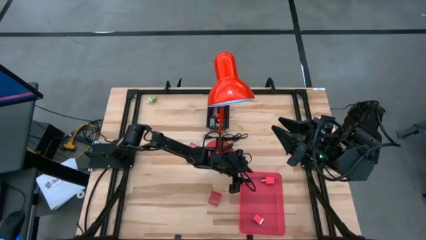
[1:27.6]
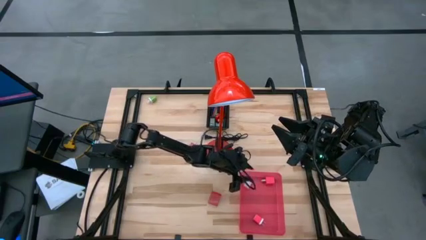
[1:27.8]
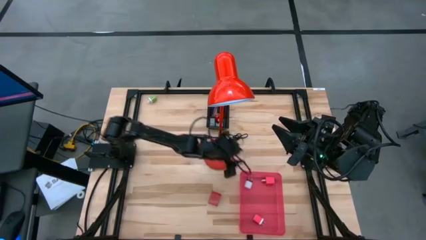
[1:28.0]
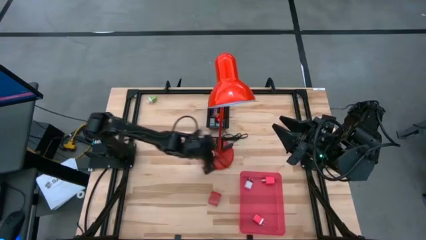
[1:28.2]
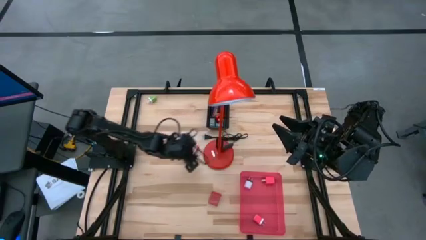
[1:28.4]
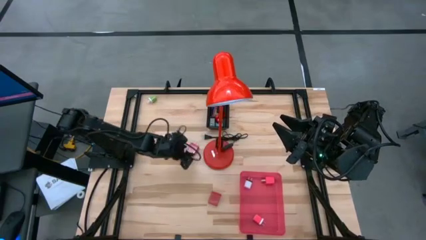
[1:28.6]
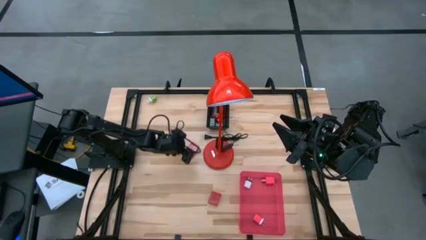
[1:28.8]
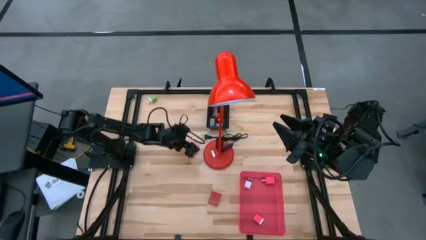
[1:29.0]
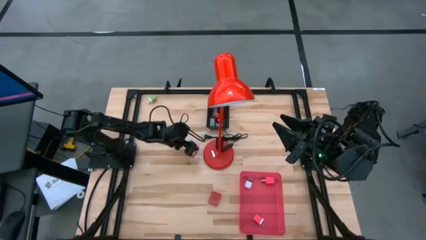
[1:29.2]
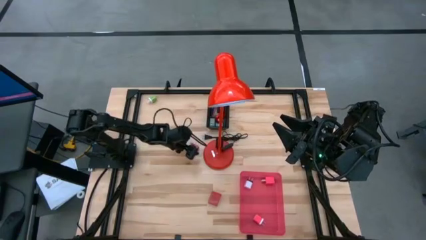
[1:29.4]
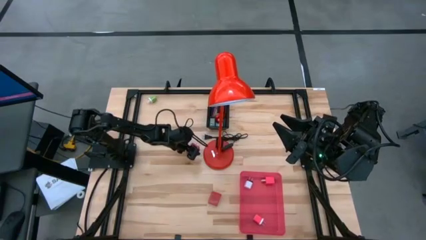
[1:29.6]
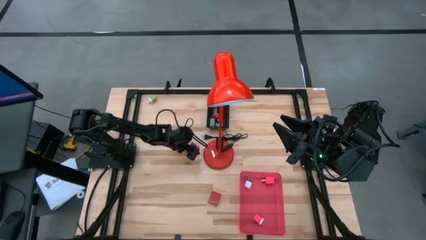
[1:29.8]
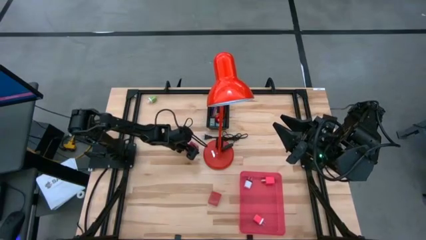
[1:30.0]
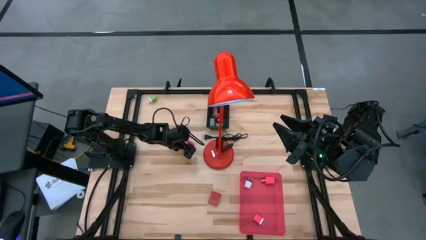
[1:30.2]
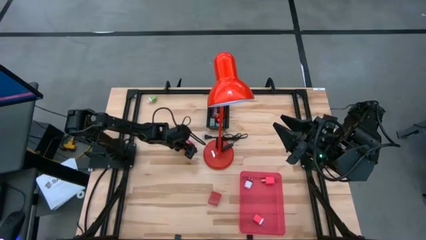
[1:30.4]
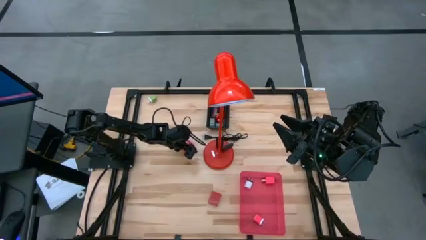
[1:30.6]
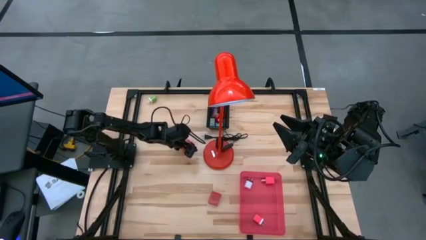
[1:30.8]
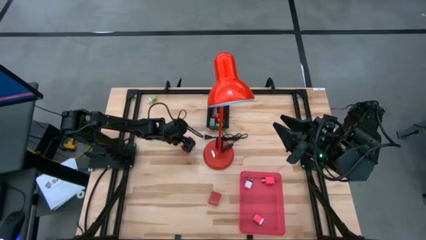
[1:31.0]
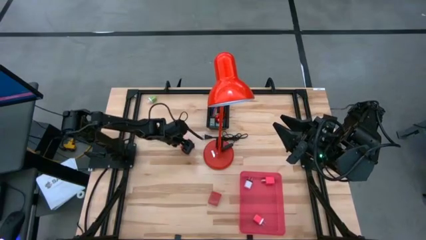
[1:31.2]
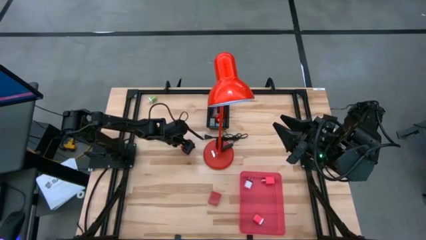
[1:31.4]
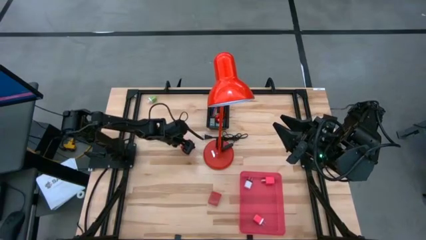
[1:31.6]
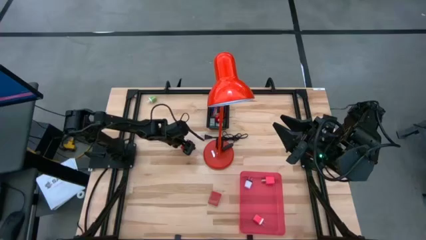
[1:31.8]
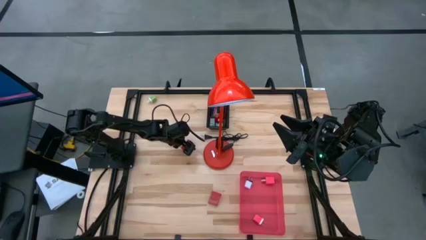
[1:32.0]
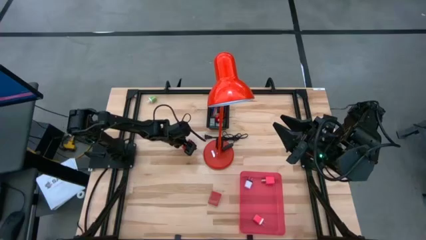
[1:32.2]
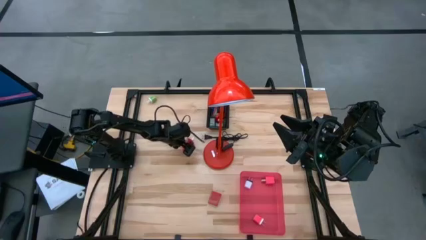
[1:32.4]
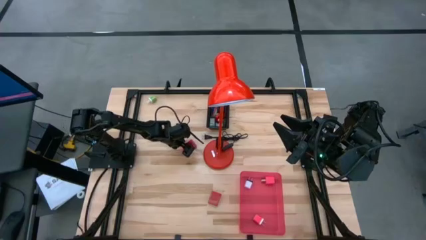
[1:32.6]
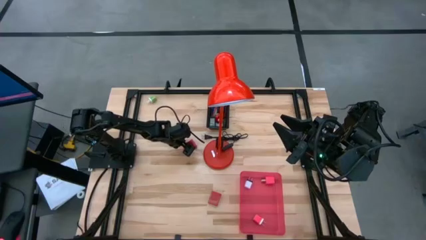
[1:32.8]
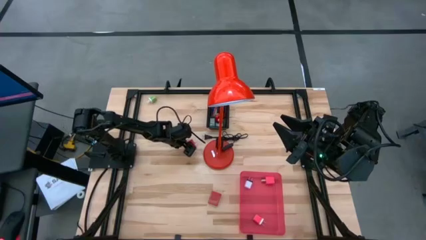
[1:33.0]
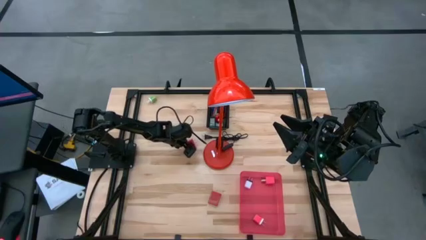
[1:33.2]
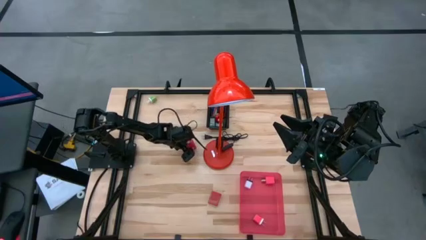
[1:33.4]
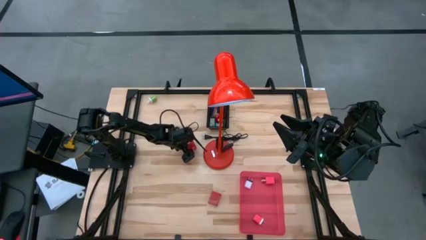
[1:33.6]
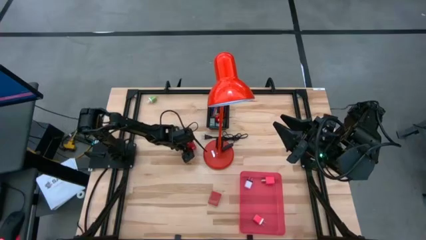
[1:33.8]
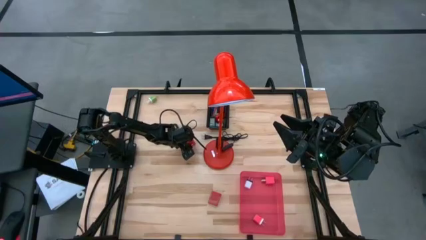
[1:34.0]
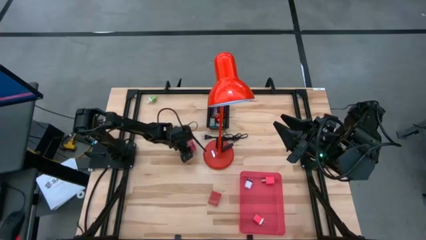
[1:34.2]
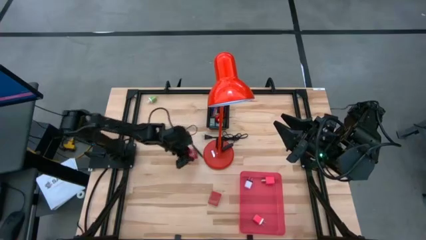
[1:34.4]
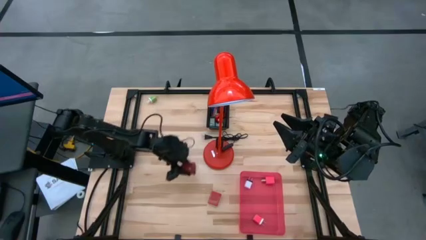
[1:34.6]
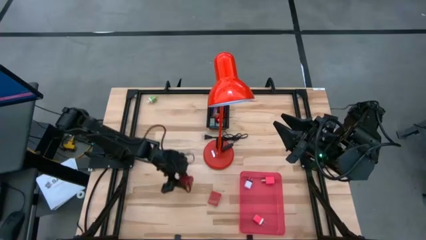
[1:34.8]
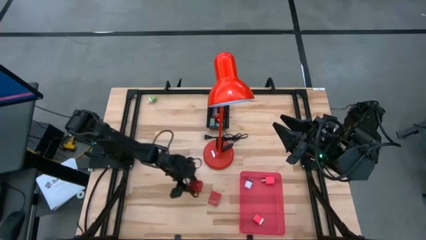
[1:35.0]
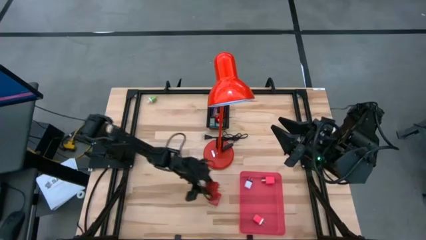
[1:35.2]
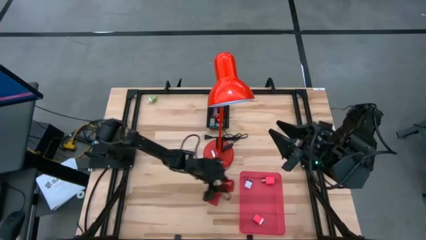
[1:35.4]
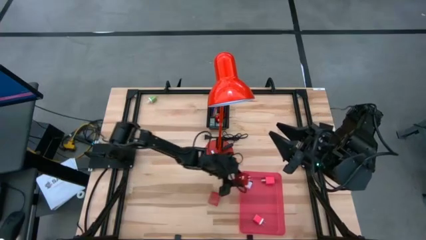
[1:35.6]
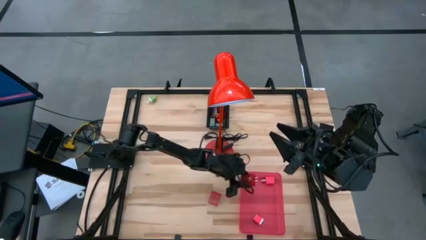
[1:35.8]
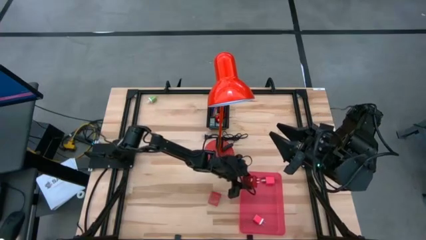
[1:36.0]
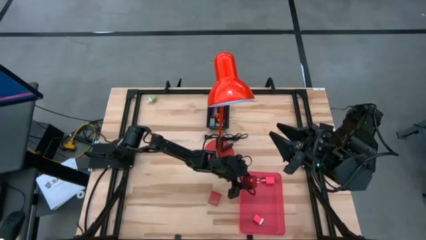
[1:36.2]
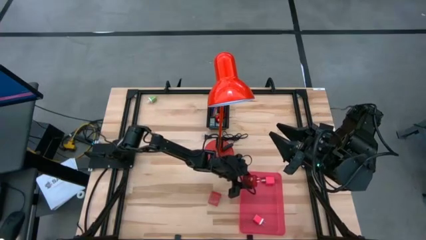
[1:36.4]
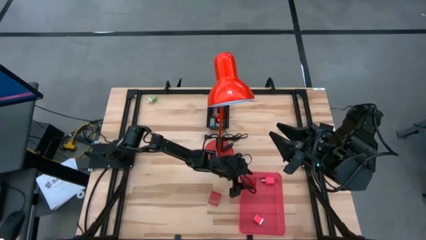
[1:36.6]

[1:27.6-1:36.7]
Task: Pick & Place Office items
Put the top red charger adapter into the red bin

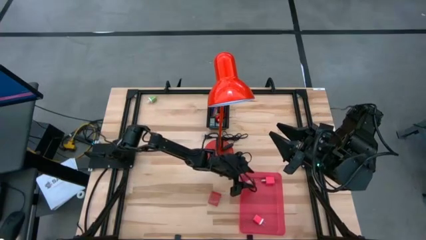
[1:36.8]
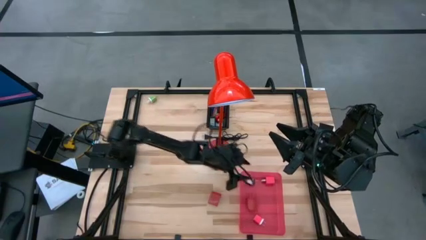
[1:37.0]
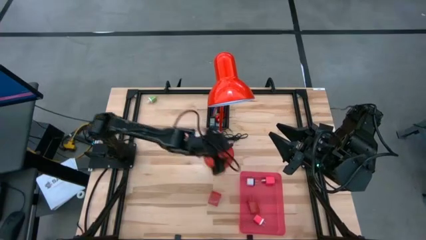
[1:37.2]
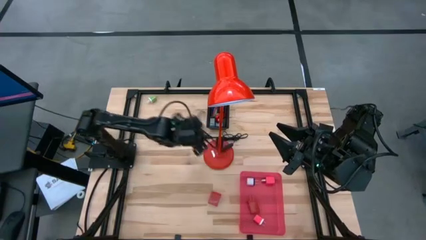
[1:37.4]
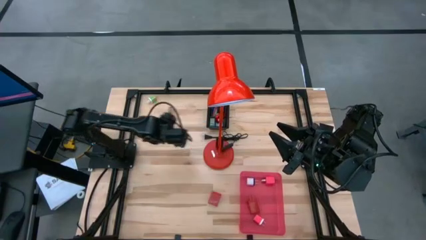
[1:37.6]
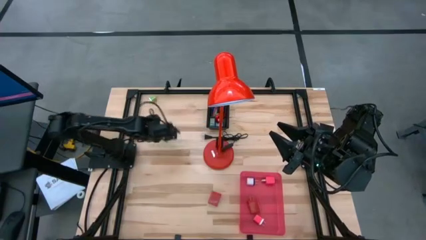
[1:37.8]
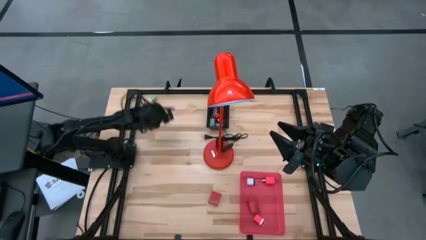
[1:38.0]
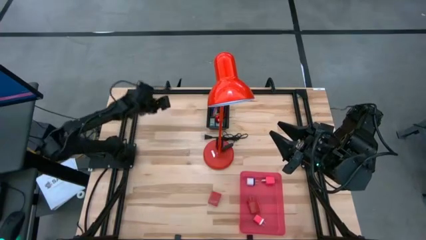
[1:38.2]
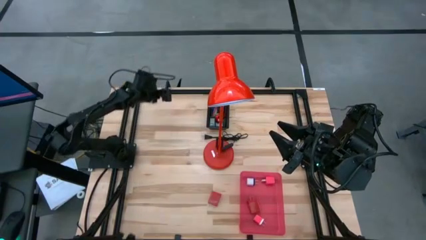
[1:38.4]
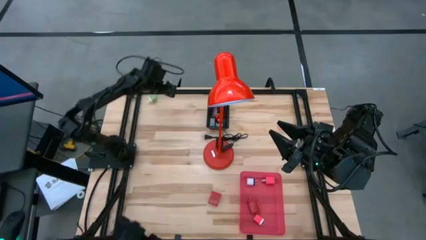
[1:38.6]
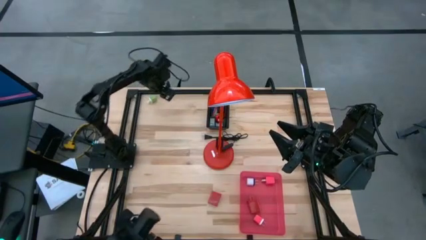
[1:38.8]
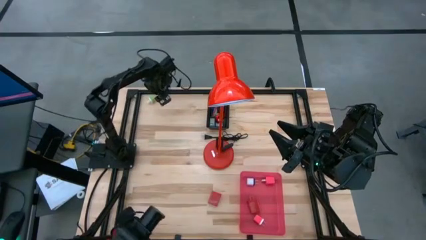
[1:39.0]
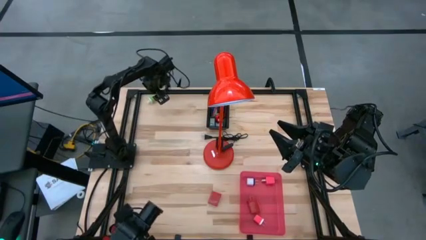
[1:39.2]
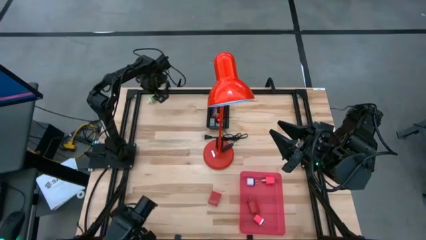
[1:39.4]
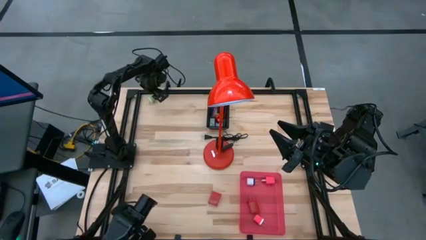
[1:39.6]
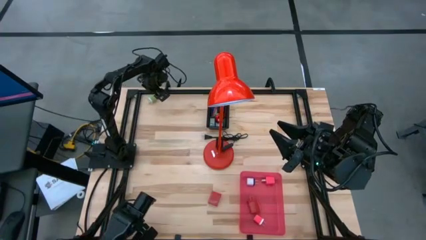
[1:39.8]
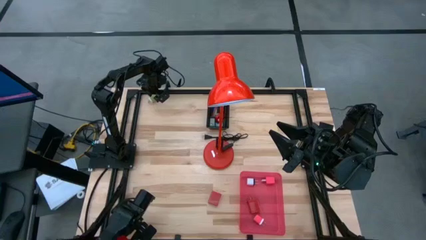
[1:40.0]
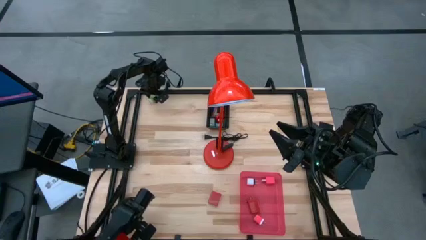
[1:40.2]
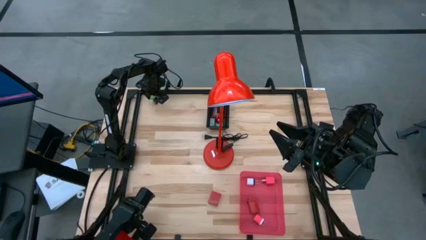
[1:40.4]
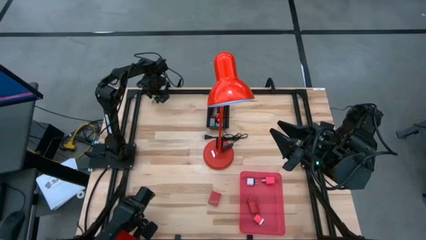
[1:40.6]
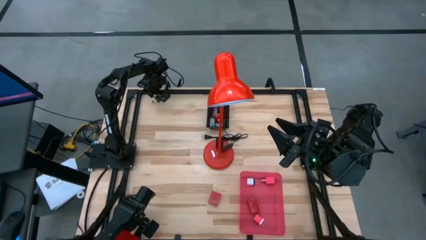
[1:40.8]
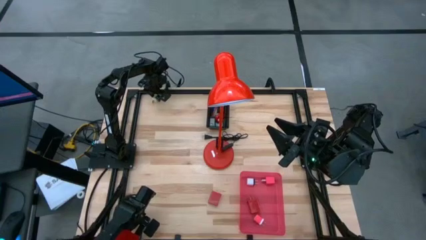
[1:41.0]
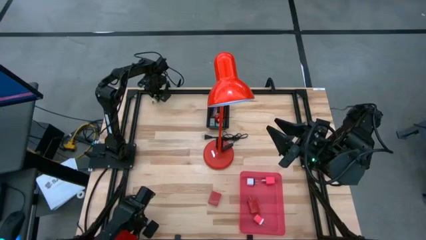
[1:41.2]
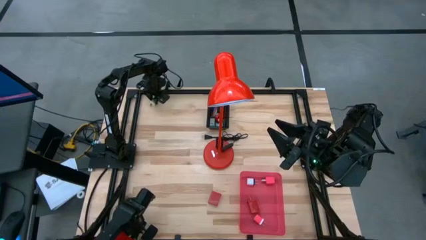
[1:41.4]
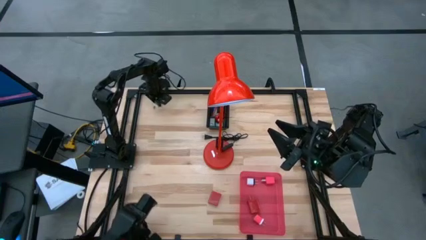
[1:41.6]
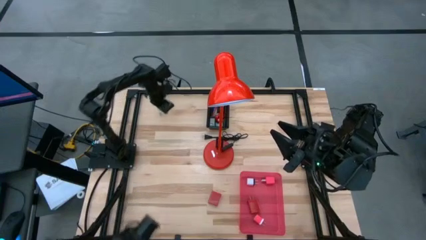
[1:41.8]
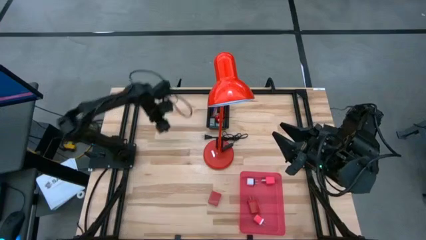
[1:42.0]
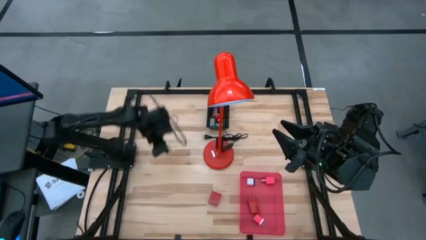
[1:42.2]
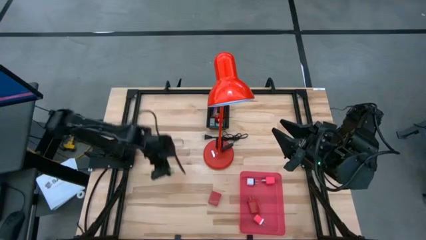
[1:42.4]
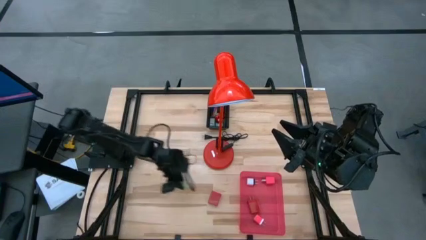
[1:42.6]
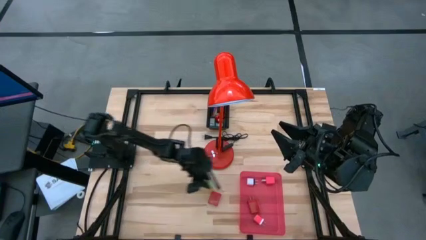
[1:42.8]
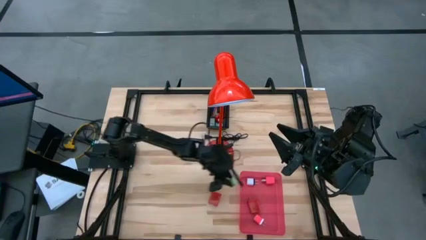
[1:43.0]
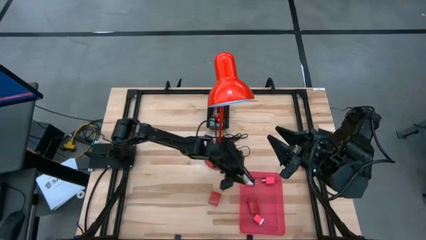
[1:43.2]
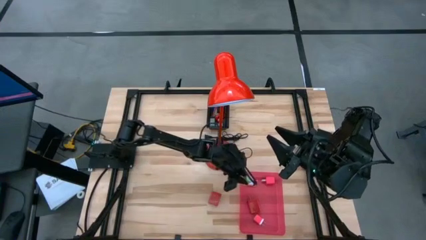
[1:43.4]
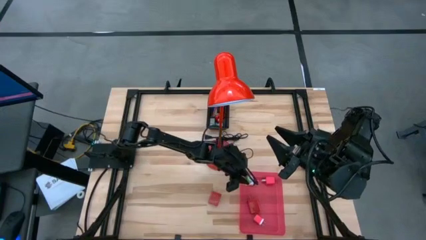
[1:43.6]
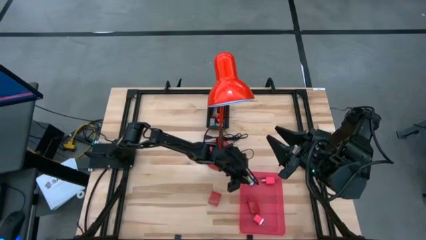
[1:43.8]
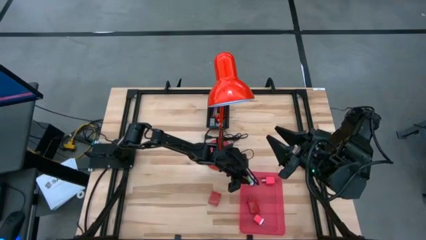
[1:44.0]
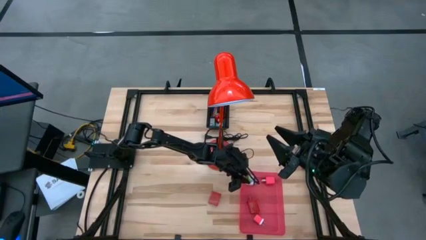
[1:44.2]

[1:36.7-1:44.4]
Put the green charger adapter into the red bin
